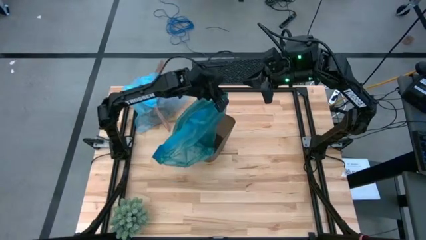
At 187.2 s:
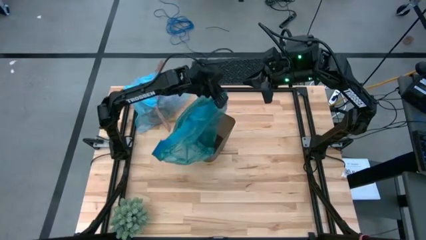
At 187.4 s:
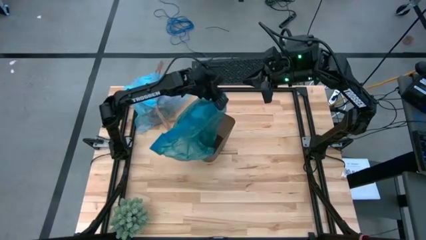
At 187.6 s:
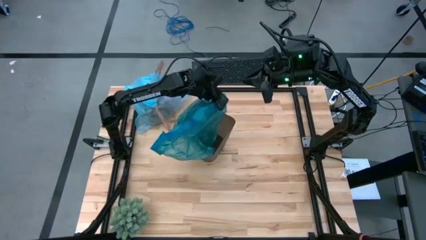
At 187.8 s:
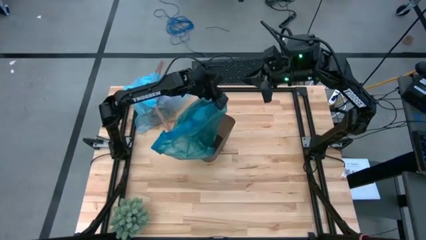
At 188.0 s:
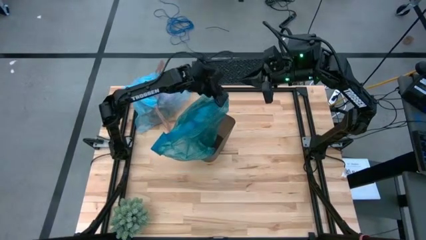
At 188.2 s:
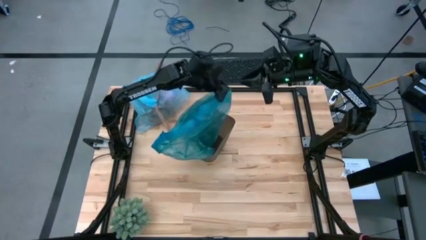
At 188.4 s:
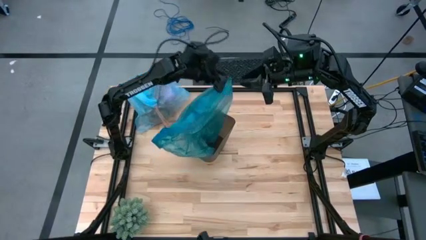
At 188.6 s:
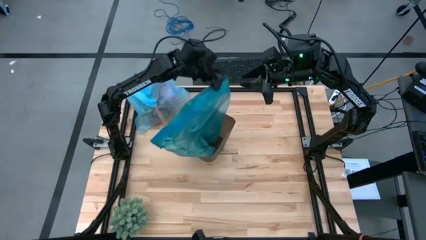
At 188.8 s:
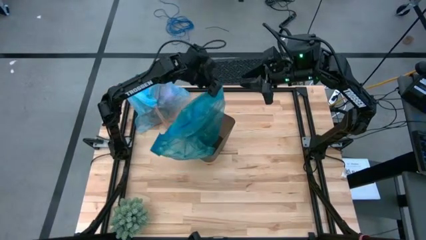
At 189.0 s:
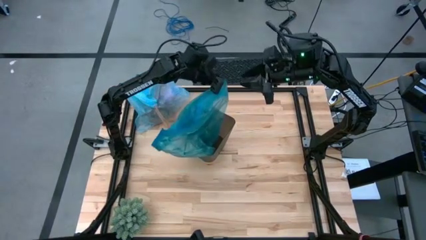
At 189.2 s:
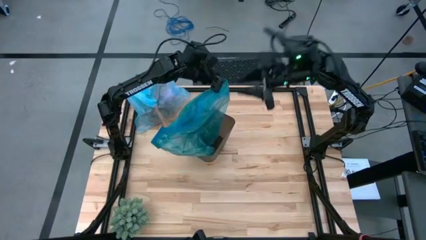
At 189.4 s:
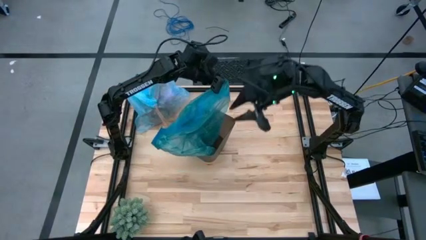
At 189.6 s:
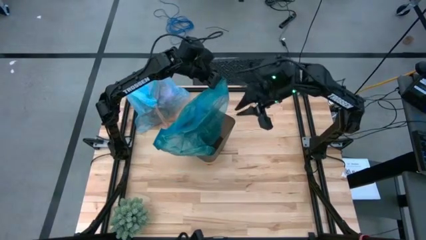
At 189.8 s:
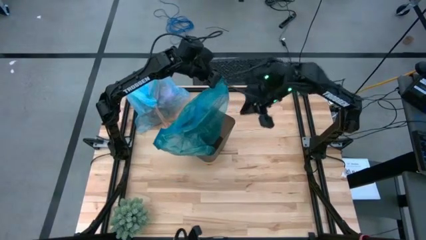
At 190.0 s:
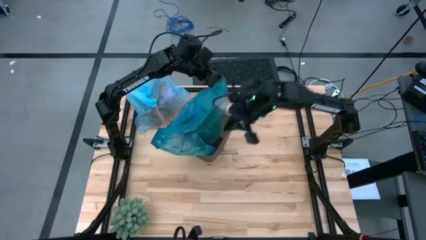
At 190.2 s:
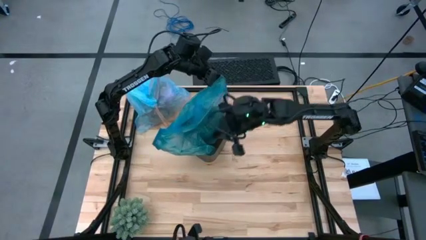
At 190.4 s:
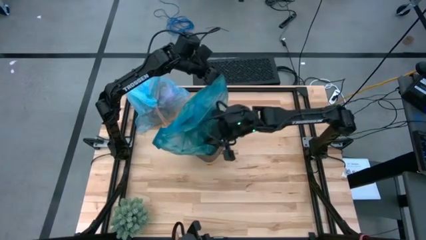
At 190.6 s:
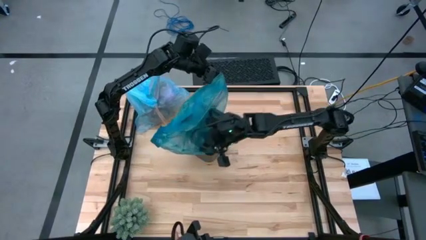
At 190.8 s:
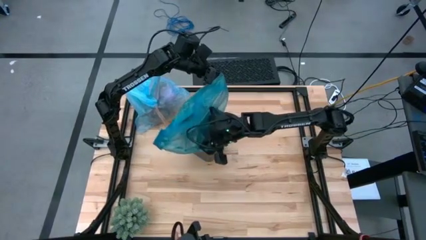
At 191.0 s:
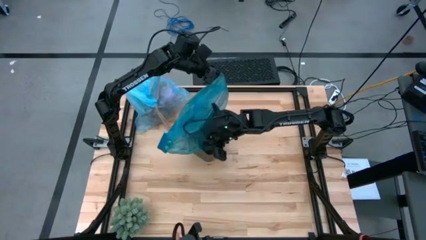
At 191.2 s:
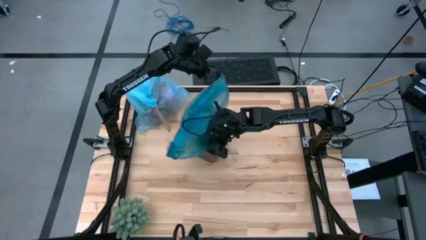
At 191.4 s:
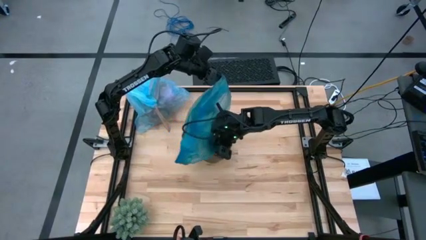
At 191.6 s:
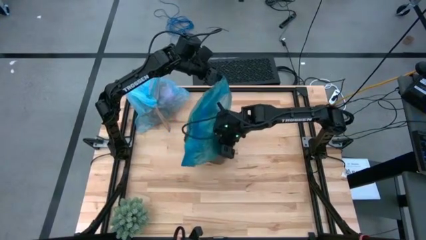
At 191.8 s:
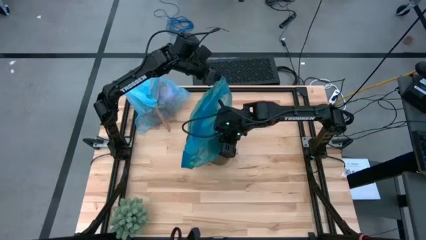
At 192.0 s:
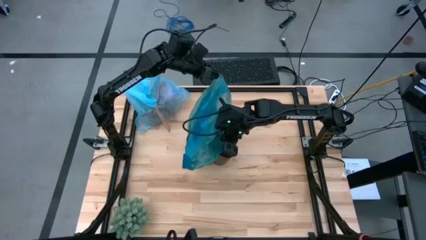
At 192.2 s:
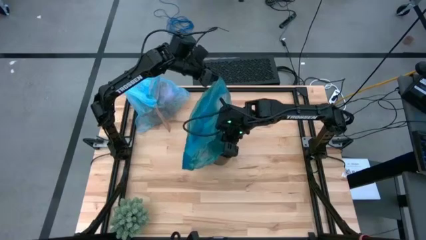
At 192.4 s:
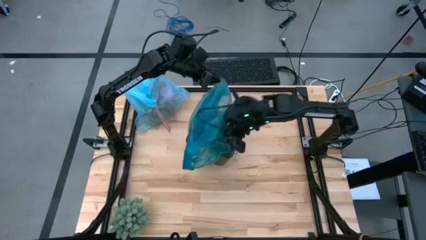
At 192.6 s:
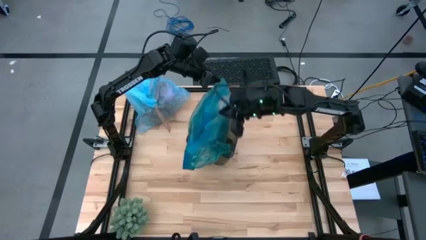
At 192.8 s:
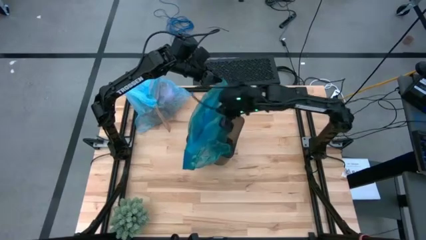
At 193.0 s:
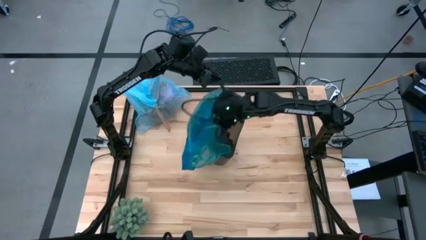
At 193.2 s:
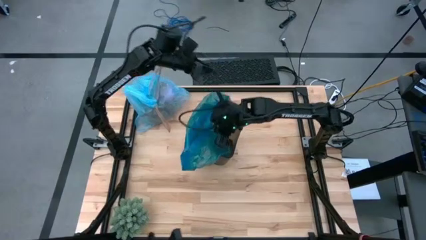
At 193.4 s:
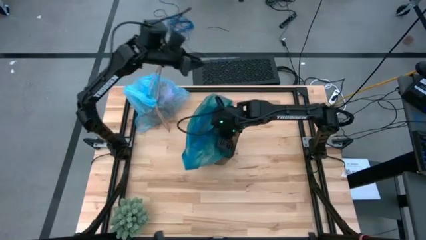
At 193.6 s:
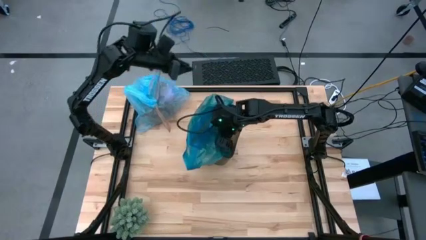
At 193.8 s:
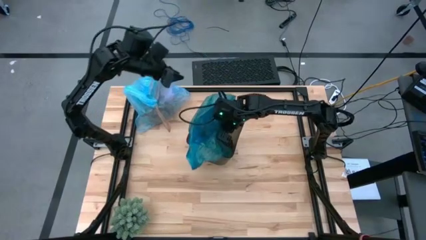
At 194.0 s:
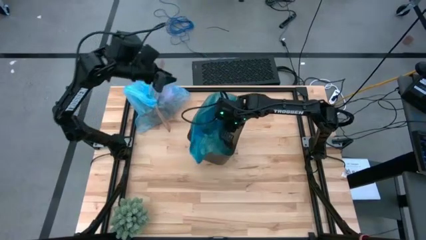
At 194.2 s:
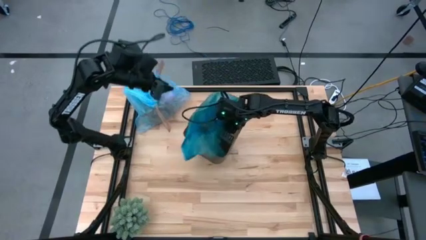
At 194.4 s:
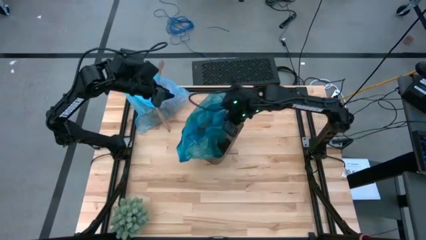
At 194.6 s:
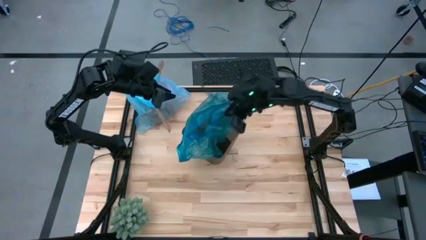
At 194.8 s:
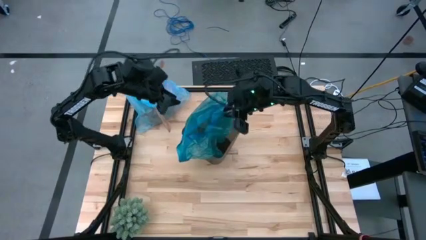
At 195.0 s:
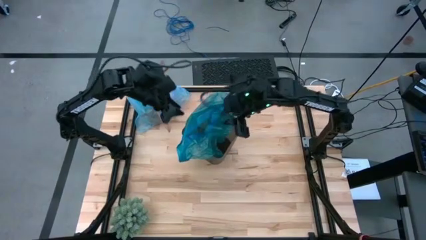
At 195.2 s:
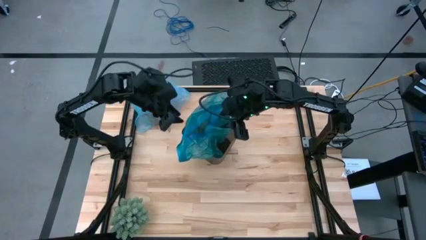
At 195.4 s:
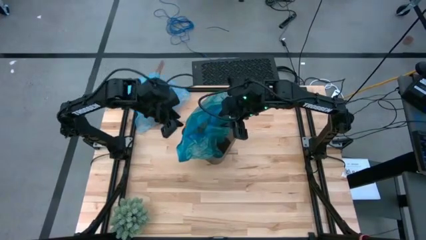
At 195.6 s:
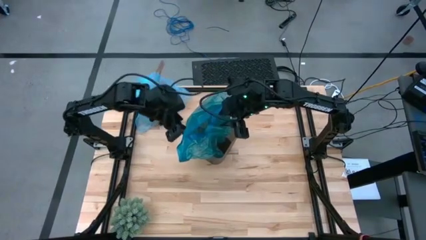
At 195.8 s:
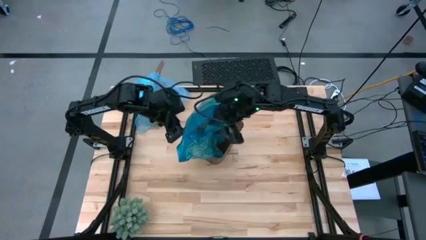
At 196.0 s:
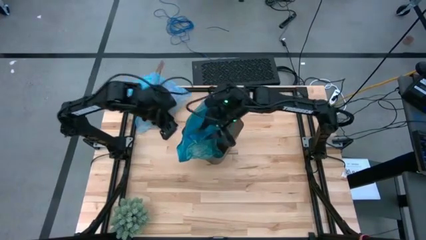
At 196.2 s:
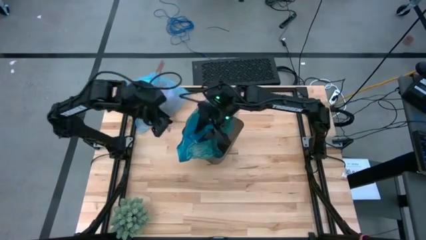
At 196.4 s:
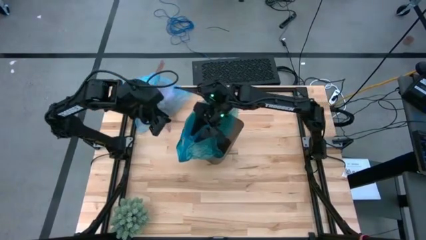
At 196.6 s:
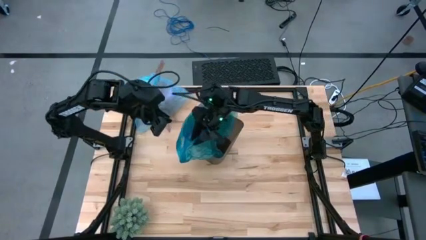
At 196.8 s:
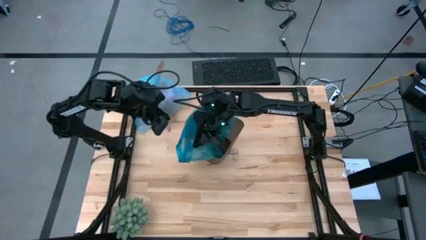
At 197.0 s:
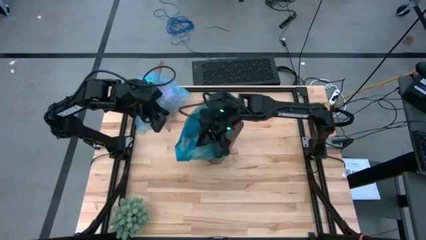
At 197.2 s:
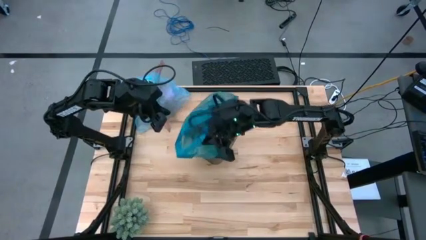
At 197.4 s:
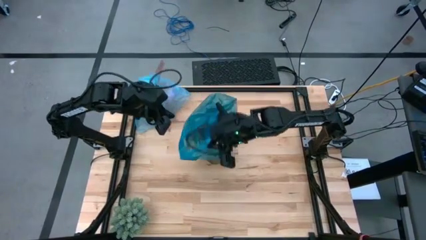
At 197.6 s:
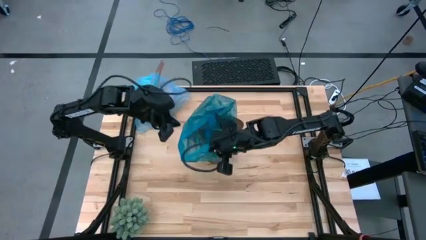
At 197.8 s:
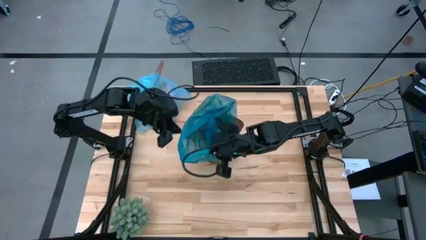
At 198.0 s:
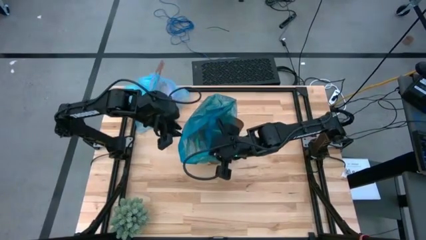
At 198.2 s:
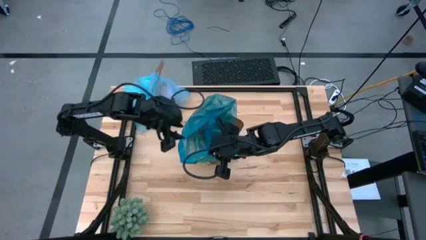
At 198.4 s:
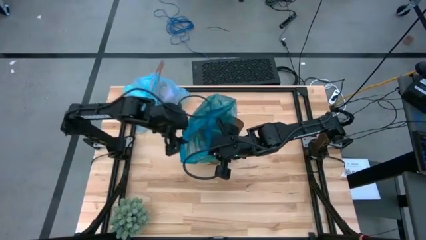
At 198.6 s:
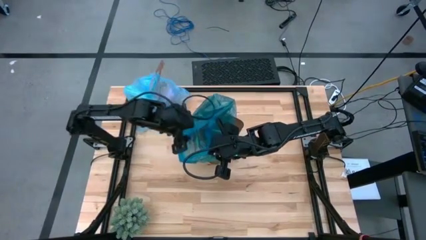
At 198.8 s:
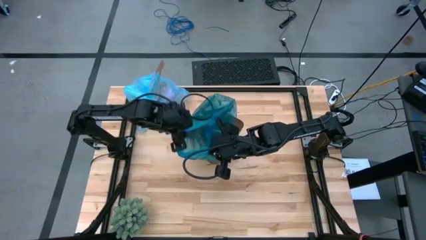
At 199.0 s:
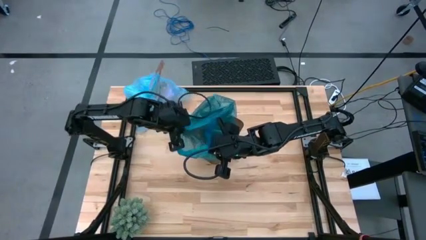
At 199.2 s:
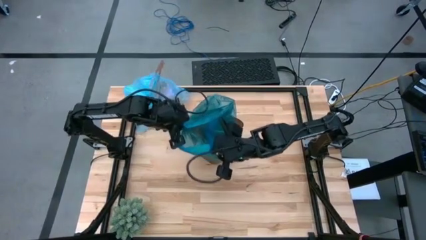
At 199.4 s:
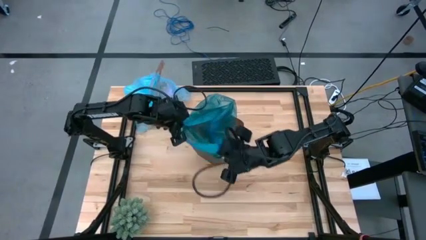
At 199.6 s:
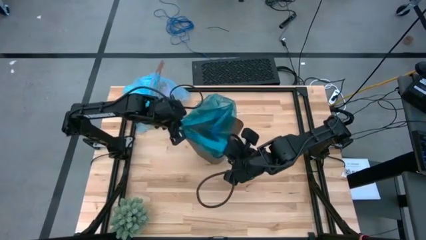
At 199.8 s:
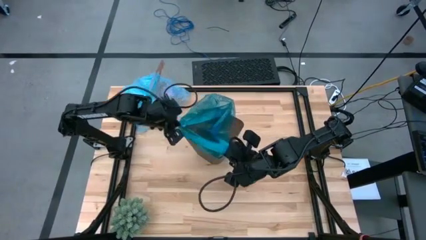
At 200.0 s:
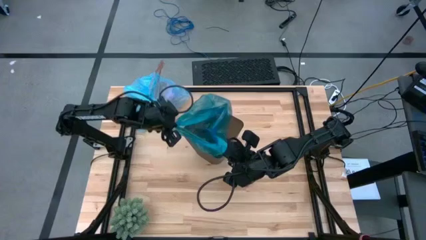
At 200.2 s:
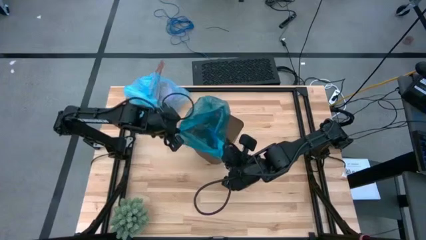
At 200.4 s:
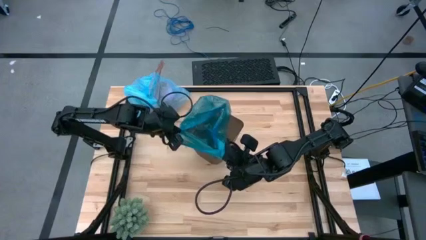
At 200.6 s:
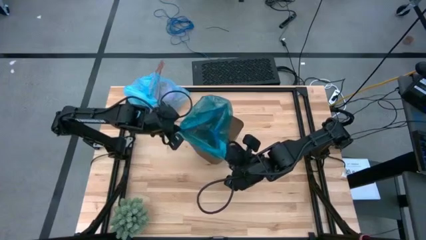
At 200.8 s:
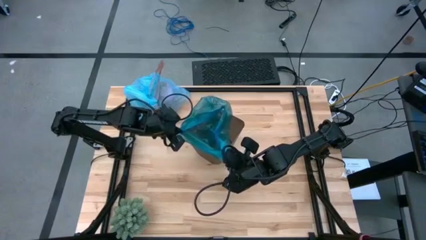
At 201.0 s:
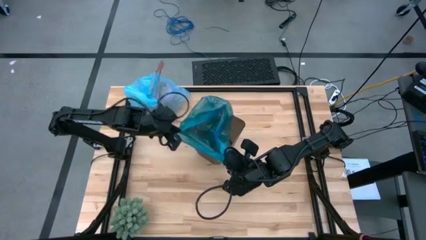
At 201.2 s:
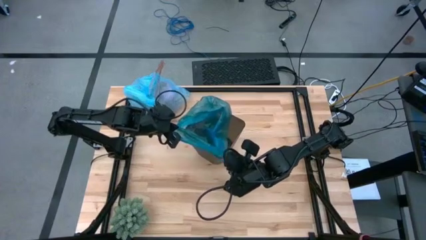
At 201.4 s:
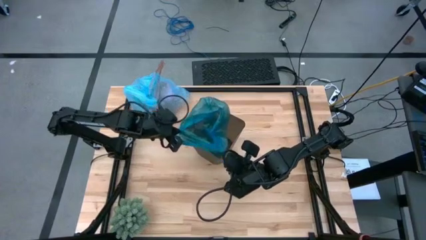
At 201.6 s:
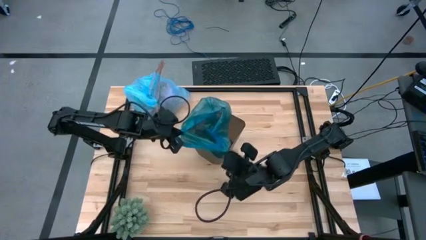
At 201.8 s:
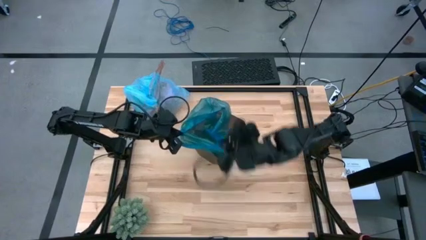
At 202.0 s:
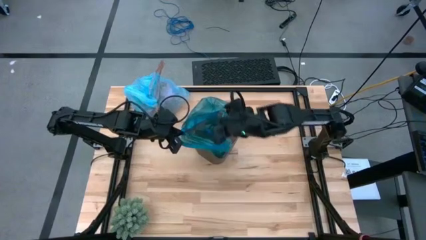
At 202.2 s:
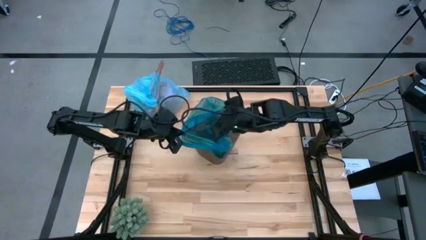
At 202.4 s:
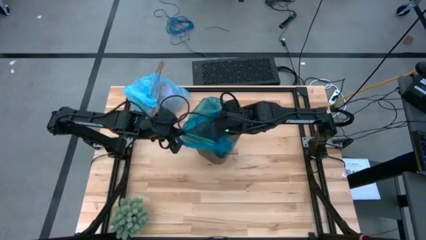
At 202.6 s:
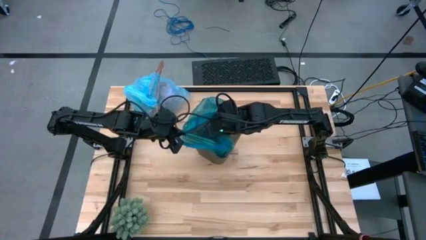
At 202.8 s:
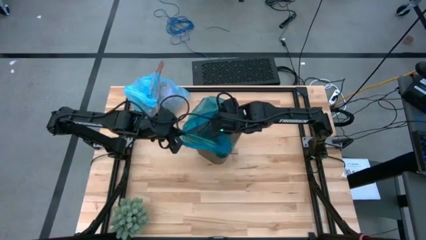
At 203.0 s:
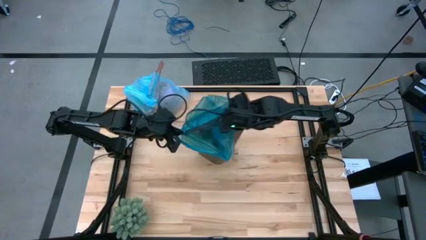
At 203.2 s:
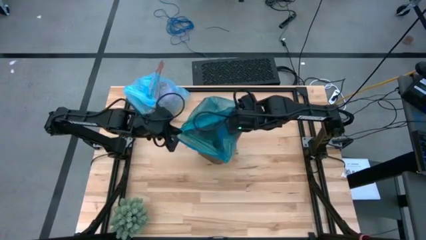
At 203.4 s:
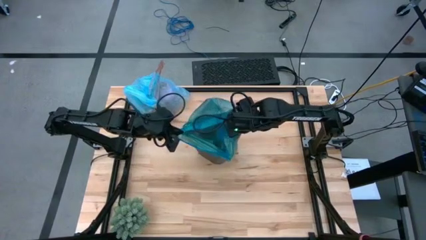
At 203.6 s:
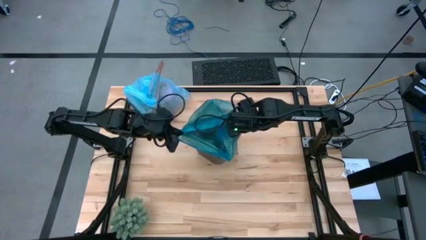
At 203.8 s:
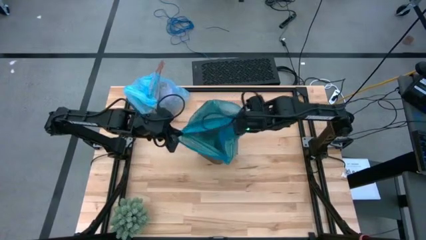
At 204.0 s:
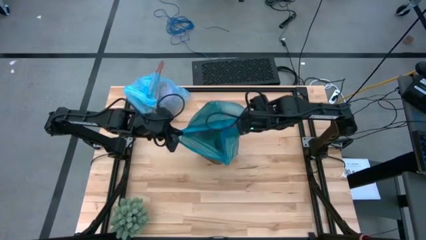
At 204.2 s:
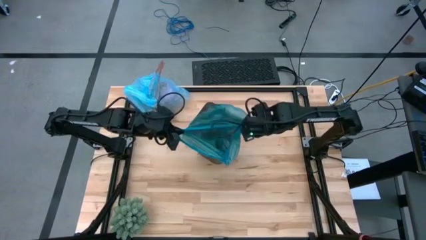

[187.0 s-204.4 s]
Task: place trash/remove bag and relplace
Insert the blue trash bag into the black trash bin
